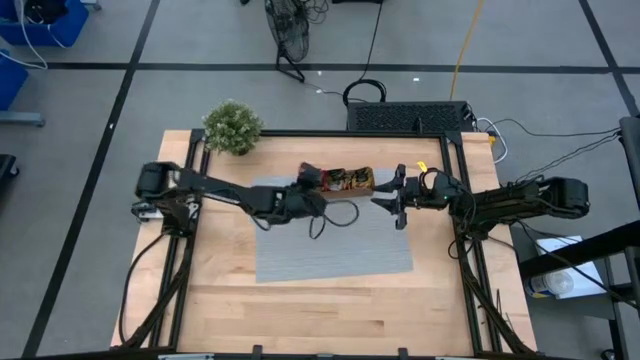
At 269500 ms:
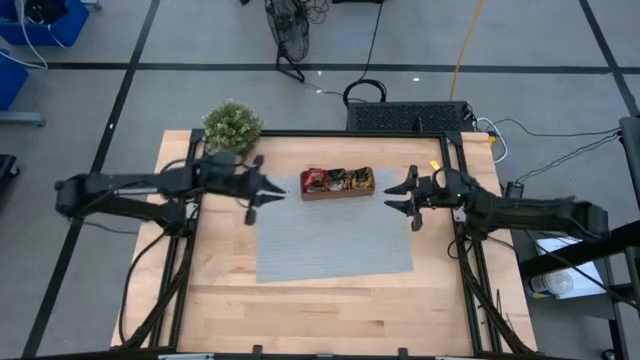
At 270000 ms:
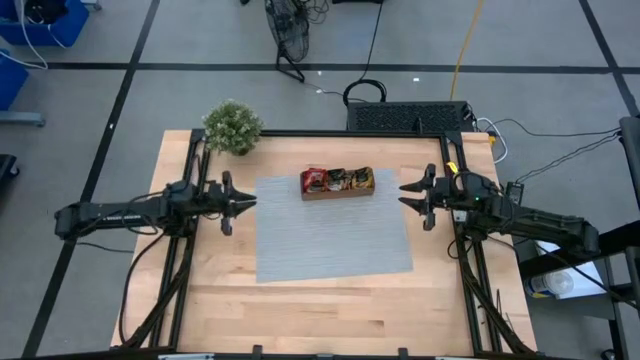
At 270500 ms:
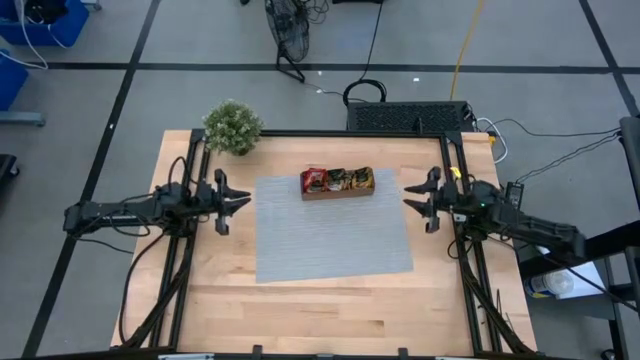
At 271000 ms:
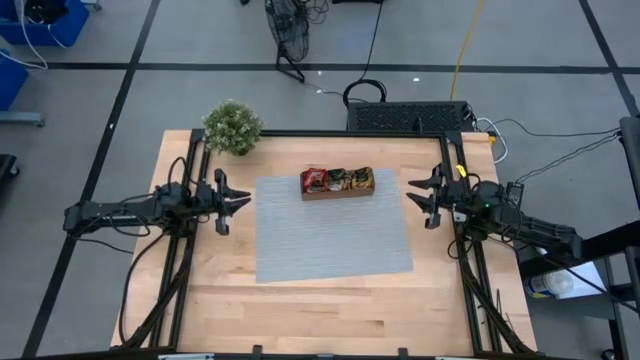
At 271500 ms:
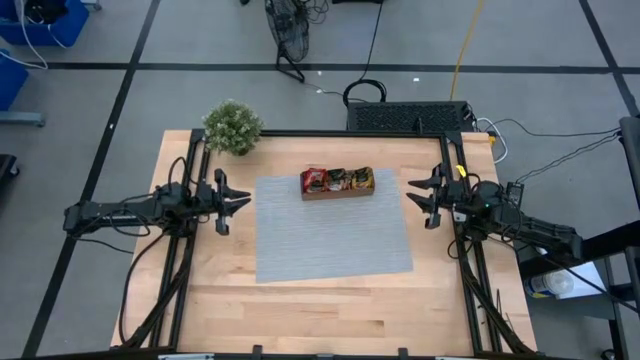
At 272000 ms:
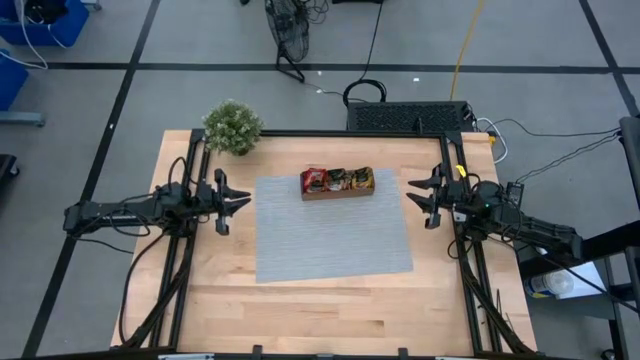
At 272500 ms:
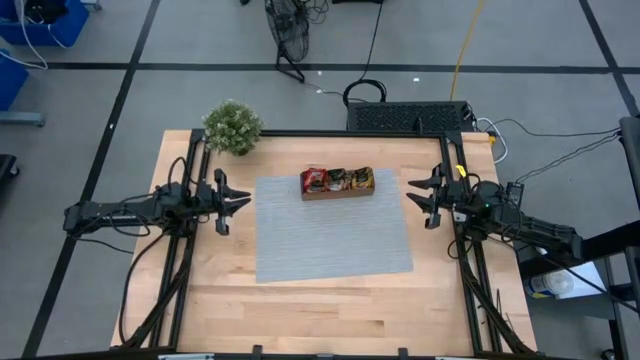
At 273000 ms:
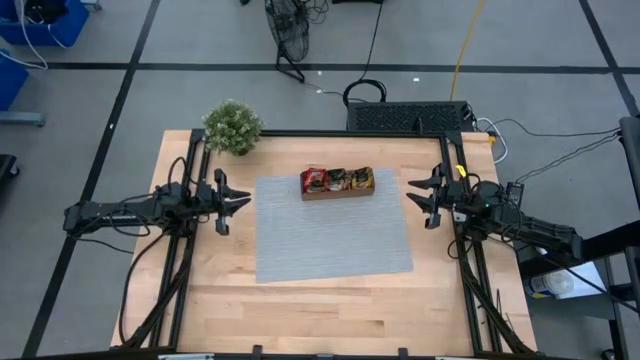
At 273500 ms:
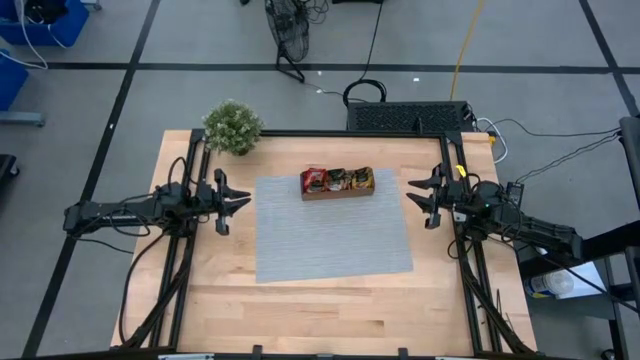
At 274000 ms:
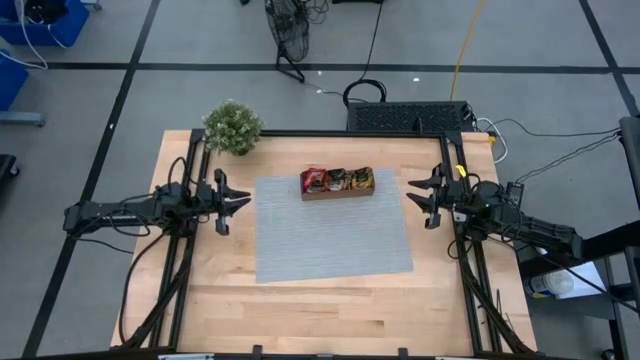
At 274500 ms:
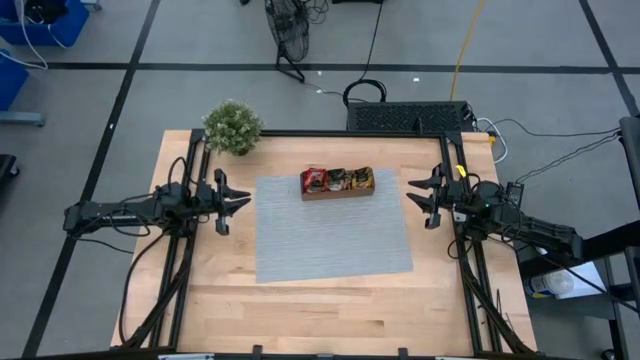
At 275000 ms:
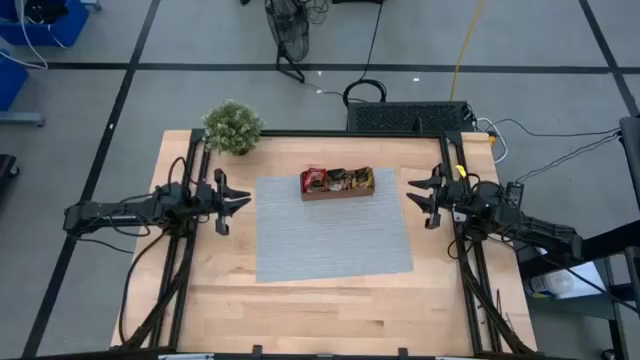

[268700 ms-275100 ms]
Task: Pick & Place Tea
Return to Home Position

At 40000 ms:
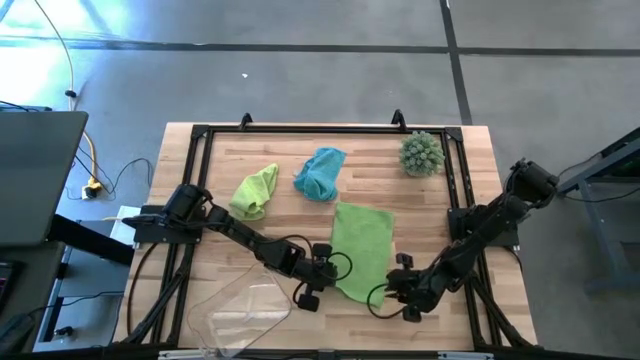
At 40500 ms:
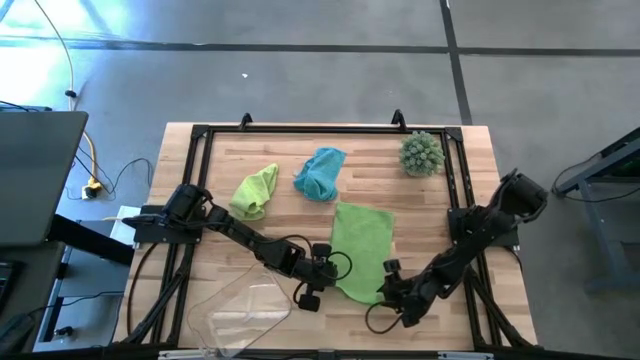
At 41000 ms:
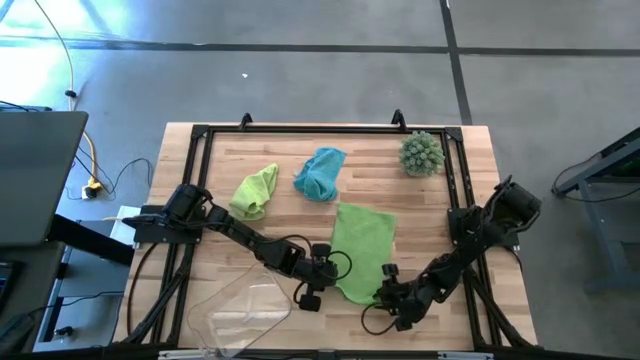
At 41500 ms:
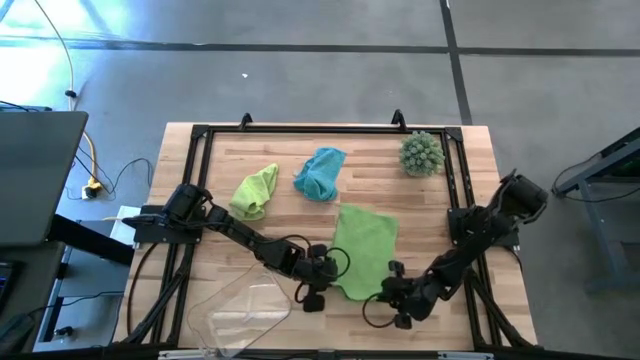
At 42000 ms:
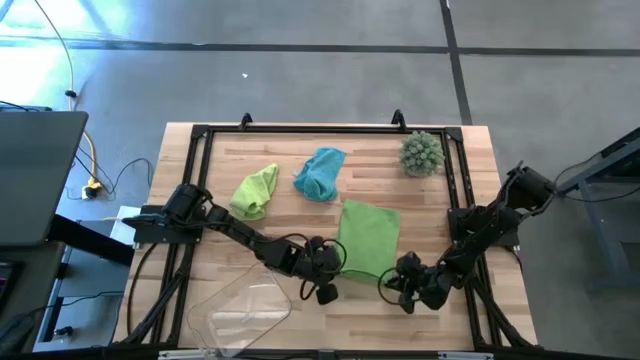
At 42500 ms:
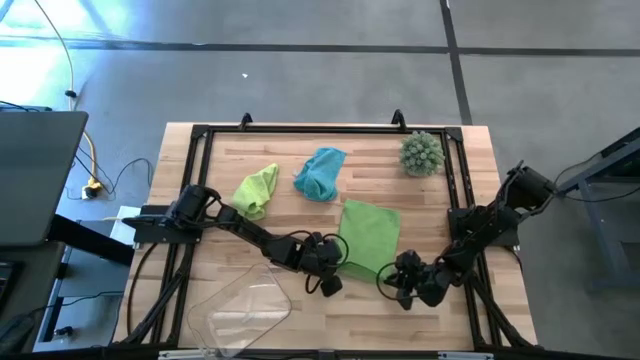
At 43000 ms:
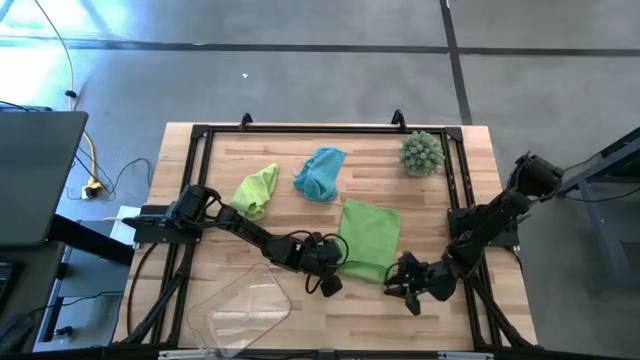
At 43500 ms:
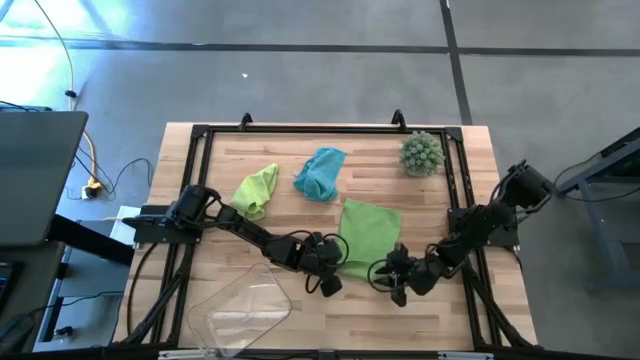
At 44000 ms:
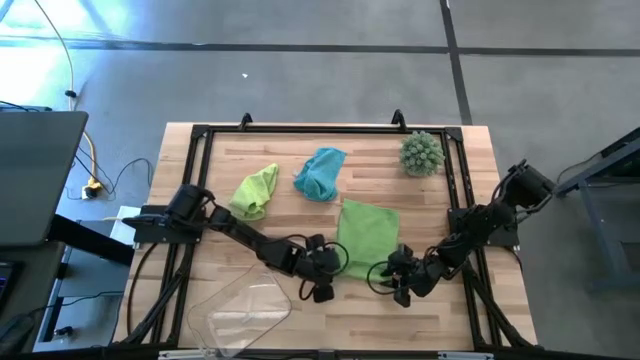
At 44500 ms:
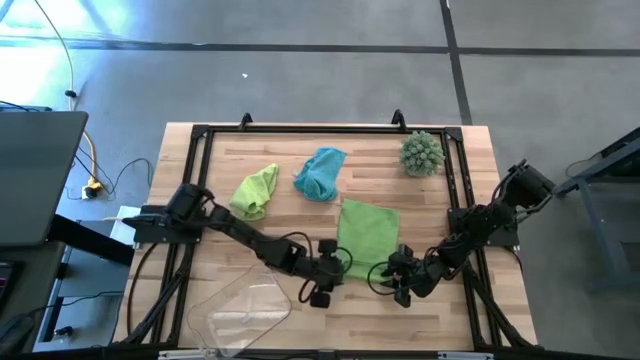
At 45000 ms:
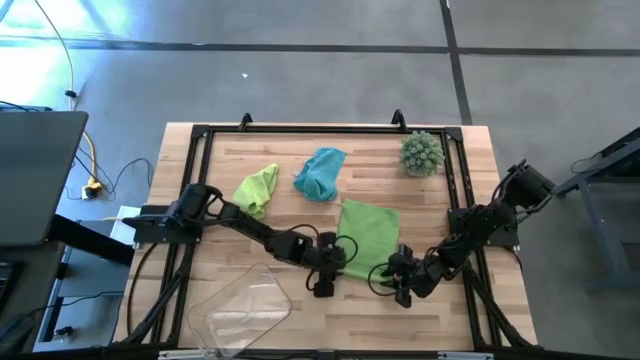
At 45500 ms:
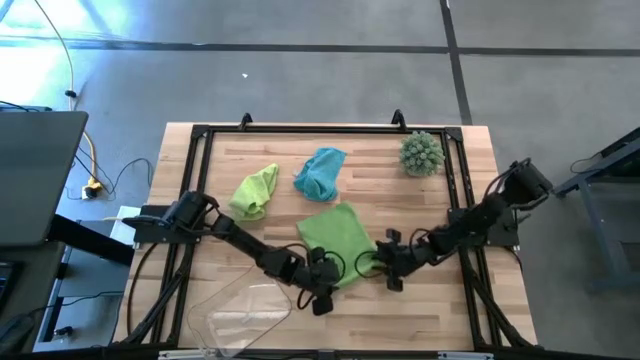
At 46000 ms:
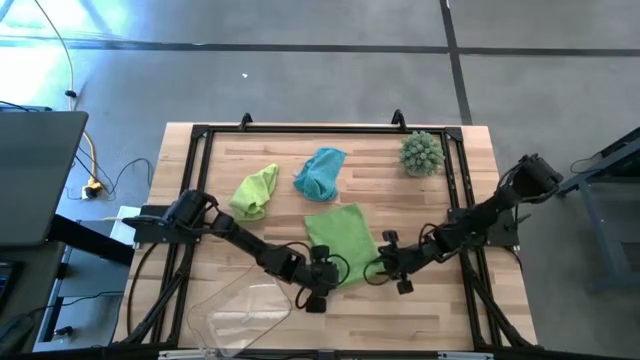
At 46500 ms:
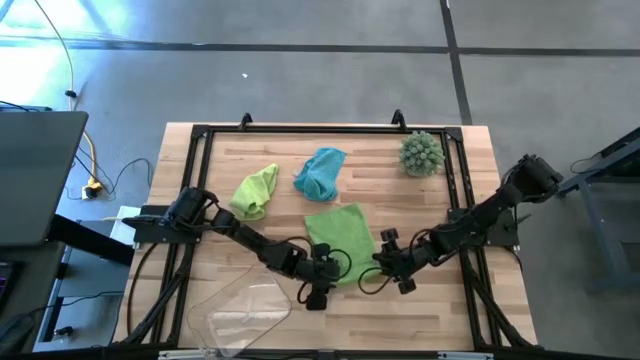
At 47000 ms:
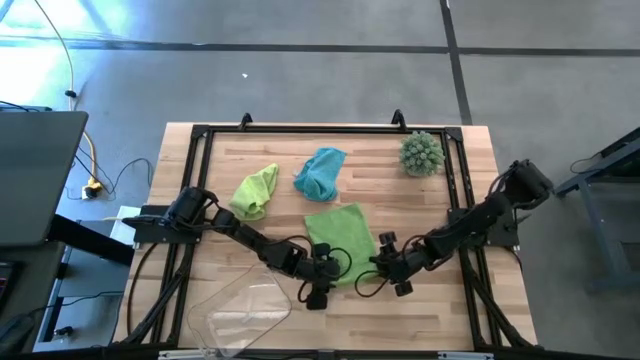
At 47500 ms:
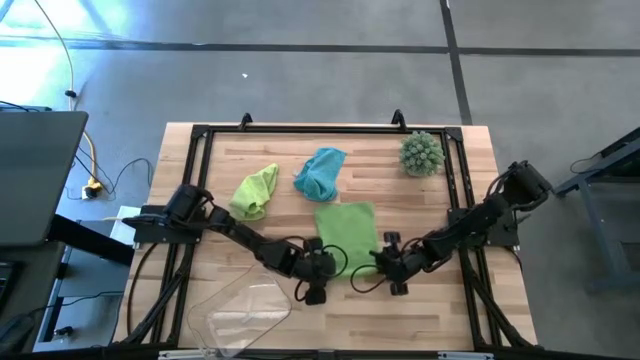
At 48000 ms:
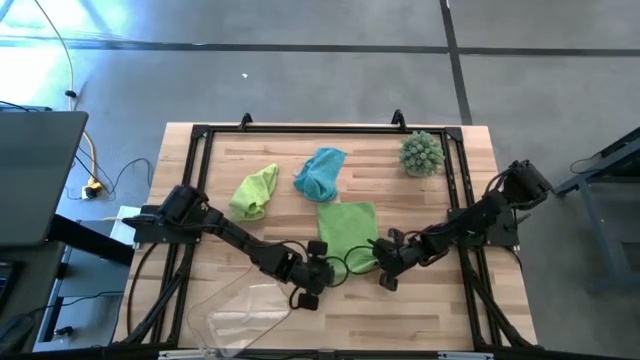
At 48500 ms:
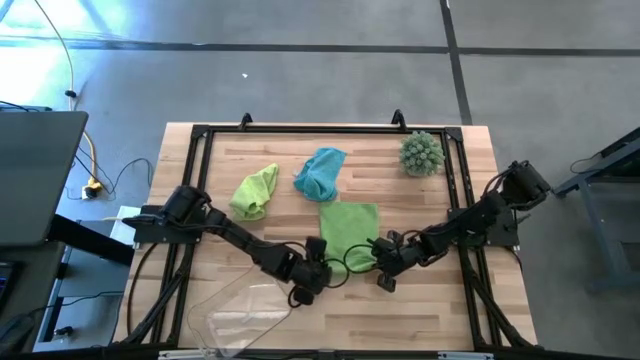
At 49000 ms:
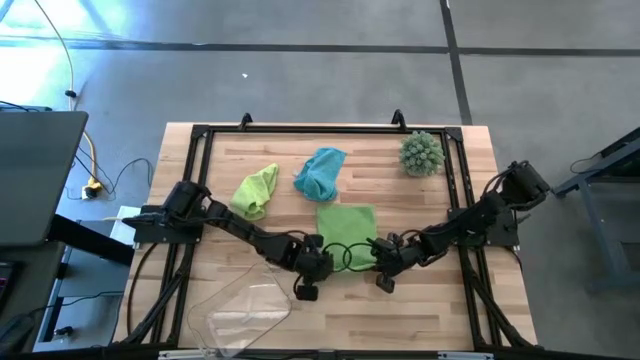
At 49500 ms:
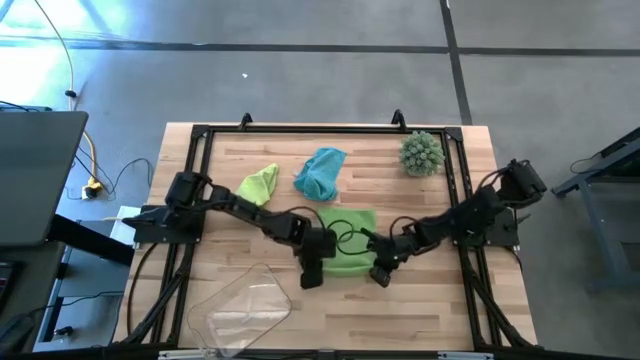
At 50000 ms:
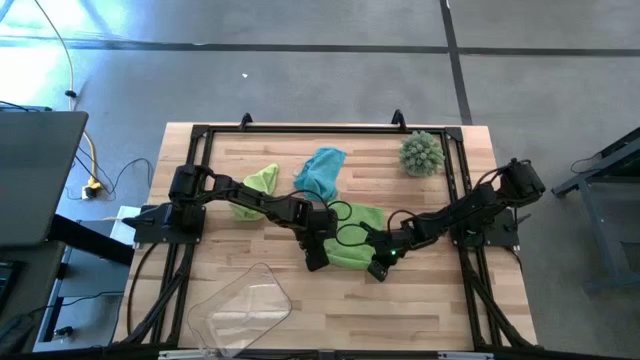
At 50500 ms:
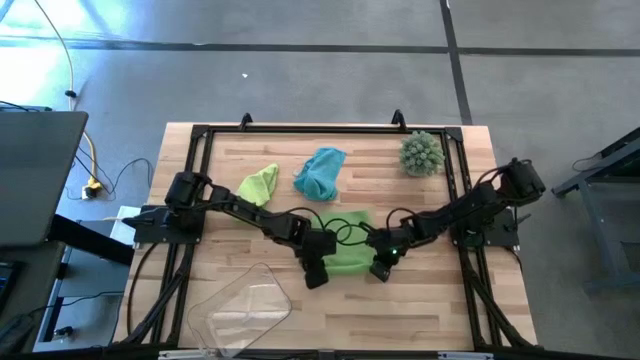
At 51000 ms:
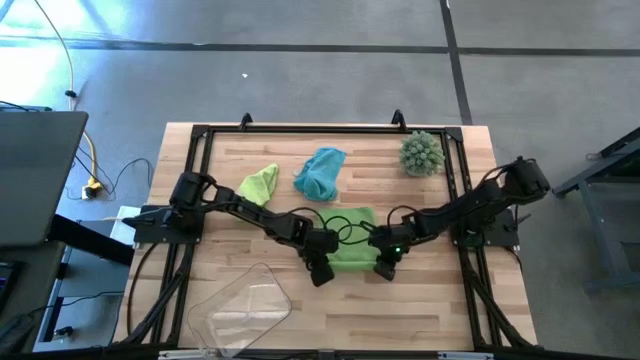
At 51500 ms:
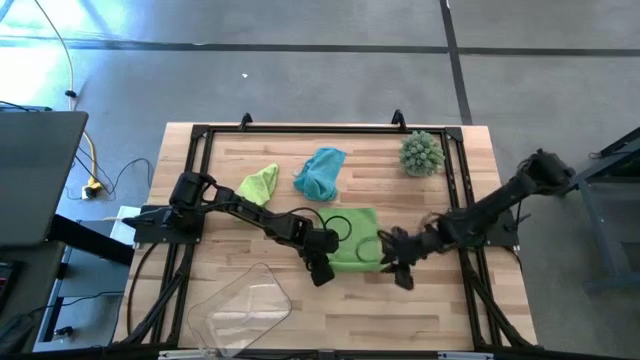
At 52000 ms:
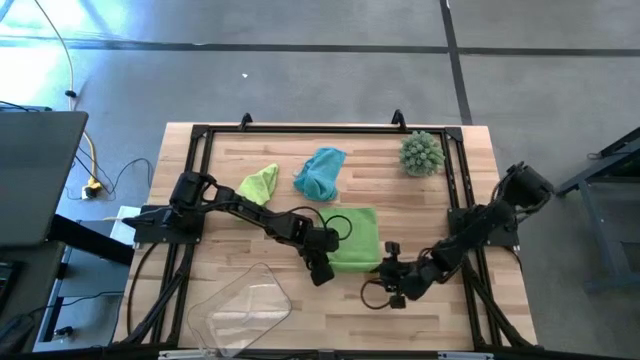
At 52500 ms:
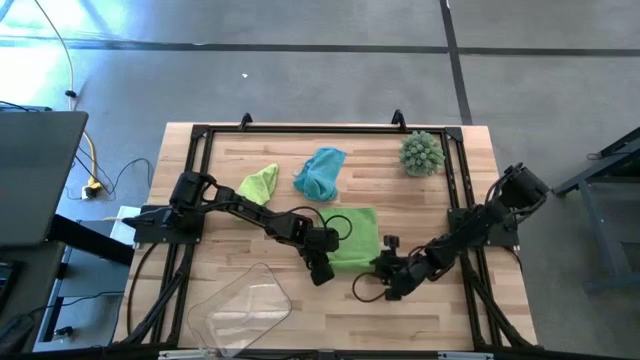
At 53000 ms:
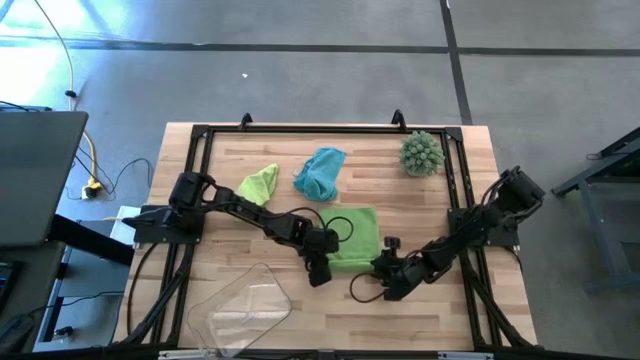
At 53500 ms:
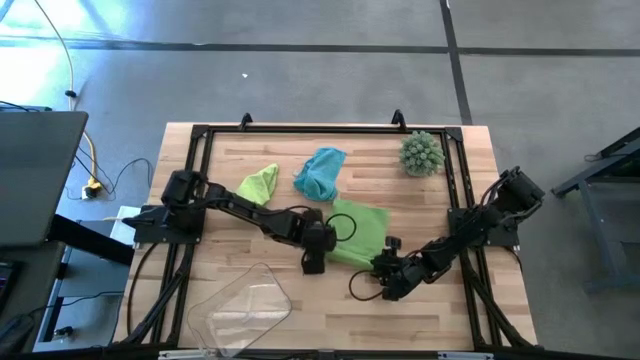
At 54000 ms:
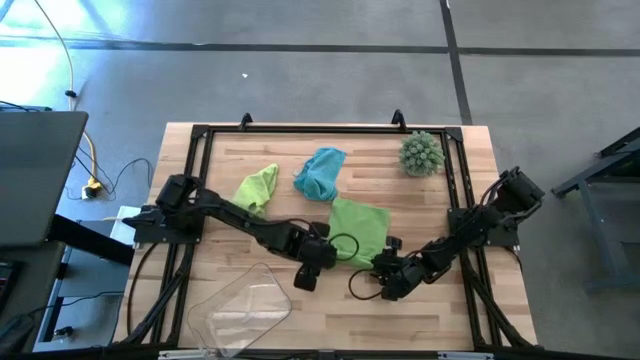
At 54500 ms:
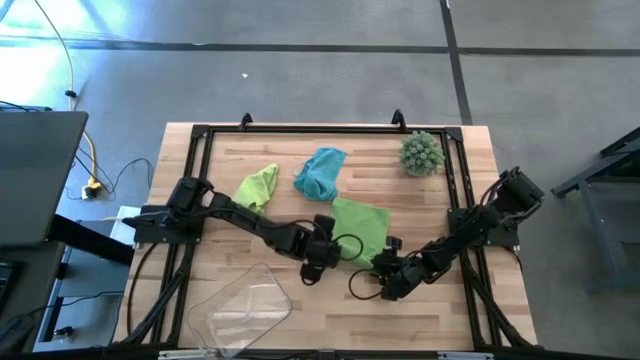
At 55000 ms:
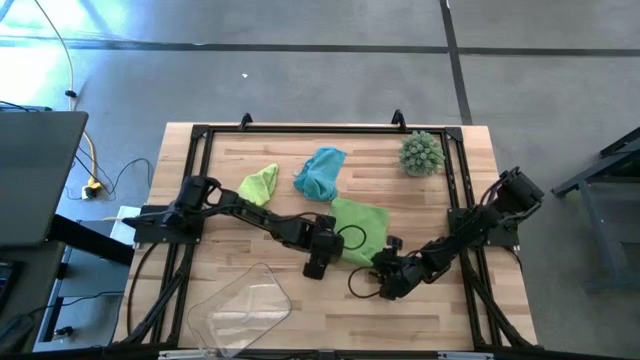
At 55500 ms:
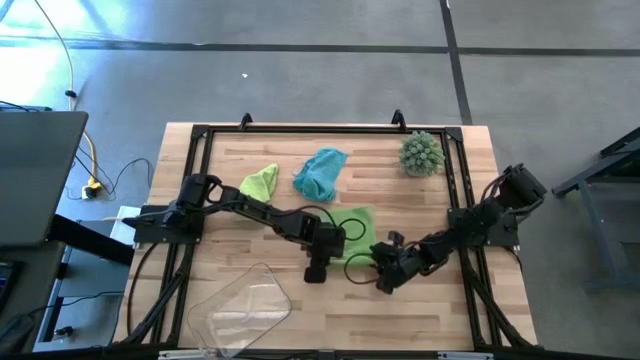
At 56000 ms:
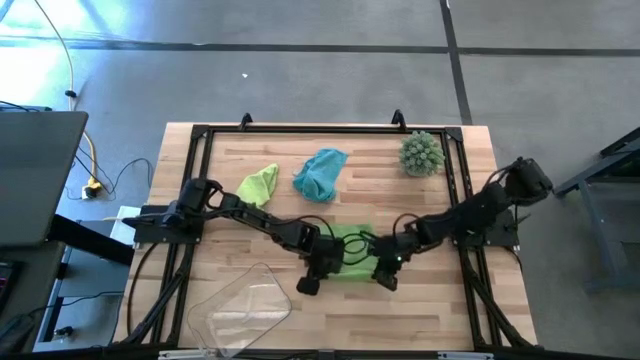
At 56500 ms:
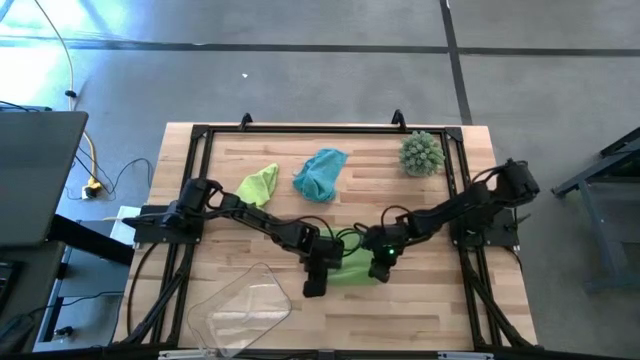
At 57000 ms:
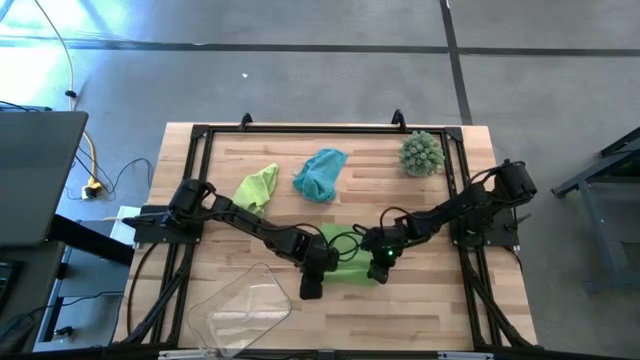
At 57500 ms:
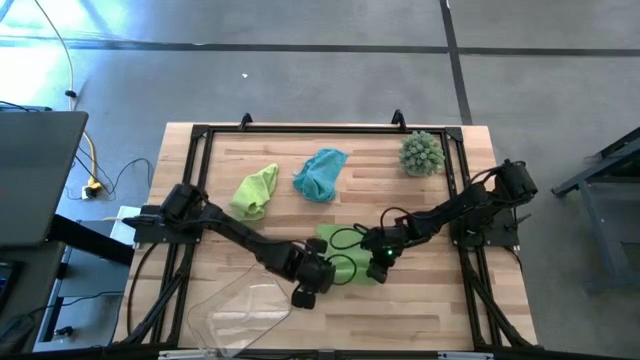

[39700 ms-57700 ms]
Task: Roll microfiber towels into tight, uniform cylinder then place into a basket
Roll the green microfiber cloth
